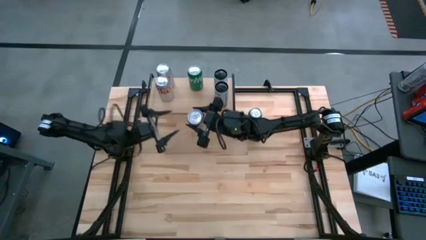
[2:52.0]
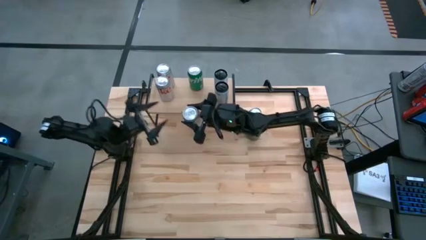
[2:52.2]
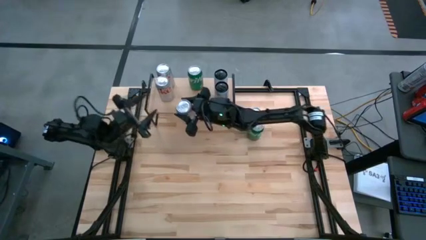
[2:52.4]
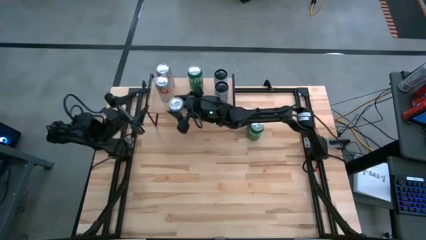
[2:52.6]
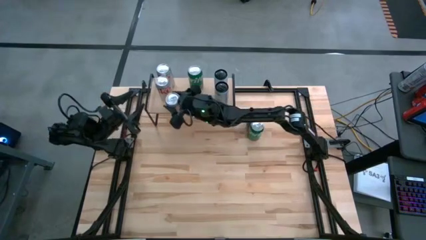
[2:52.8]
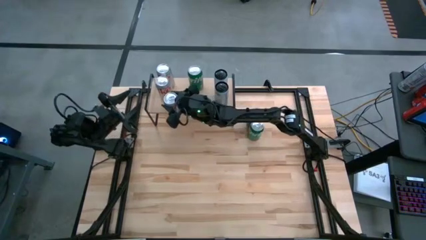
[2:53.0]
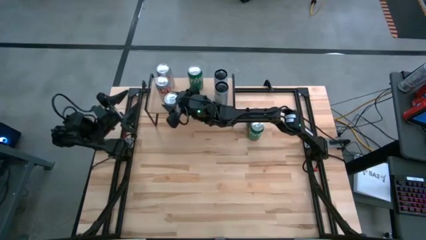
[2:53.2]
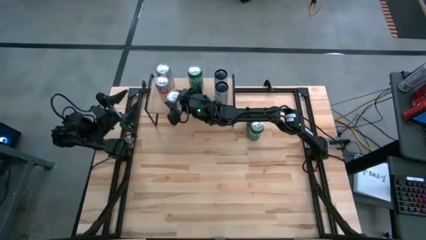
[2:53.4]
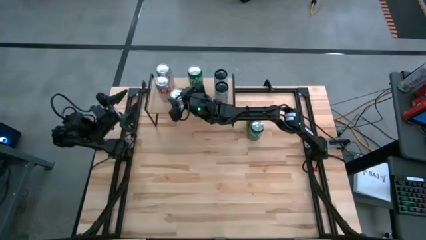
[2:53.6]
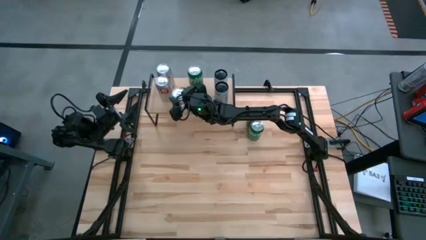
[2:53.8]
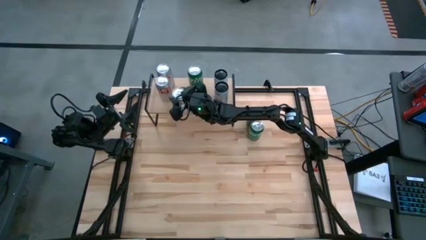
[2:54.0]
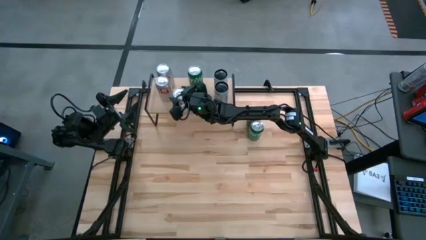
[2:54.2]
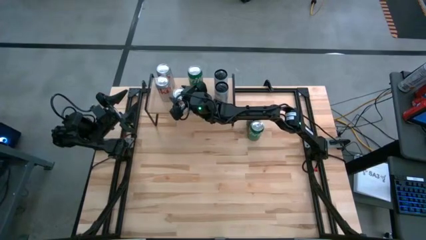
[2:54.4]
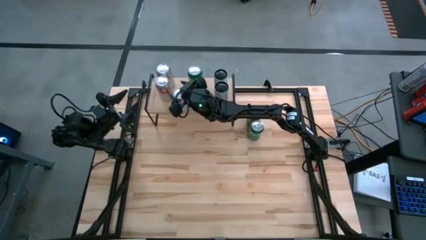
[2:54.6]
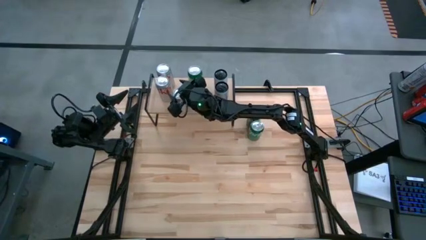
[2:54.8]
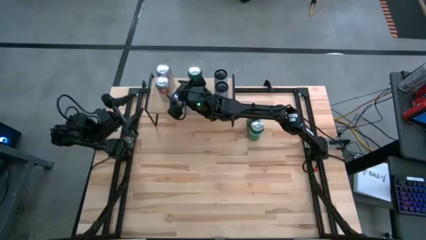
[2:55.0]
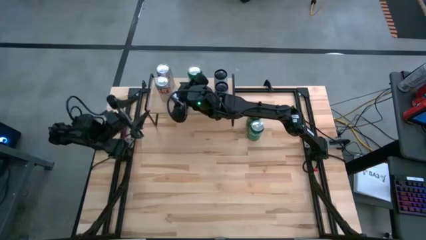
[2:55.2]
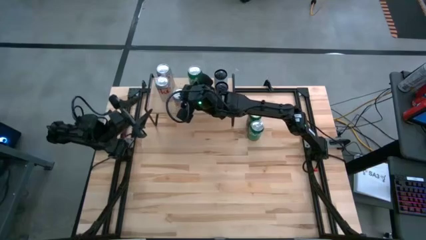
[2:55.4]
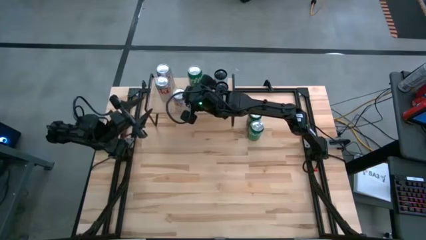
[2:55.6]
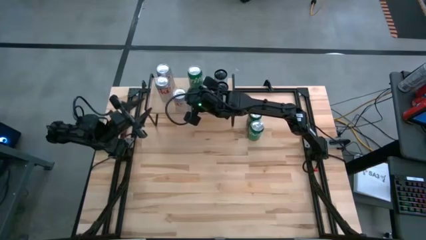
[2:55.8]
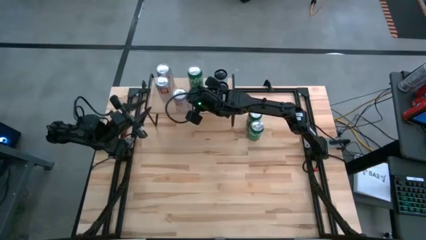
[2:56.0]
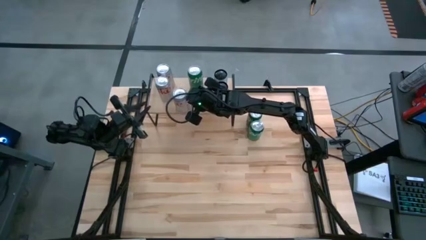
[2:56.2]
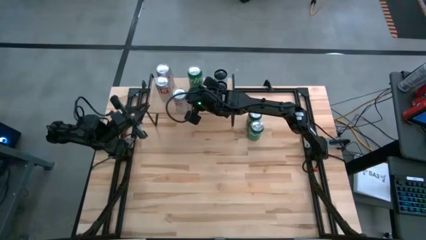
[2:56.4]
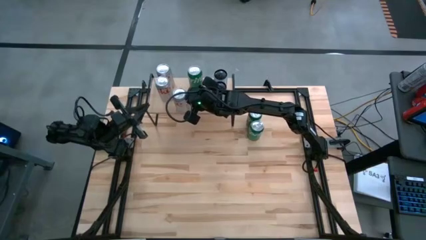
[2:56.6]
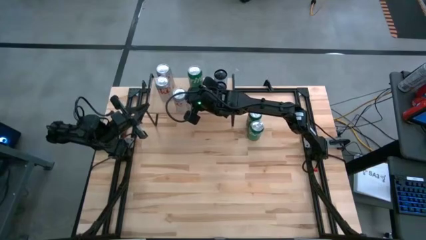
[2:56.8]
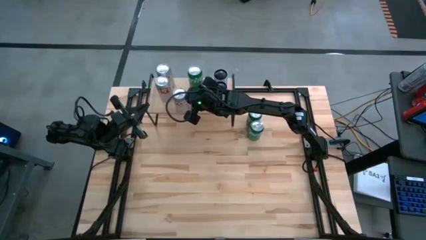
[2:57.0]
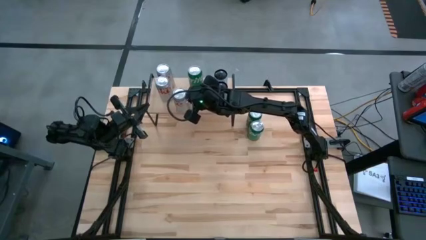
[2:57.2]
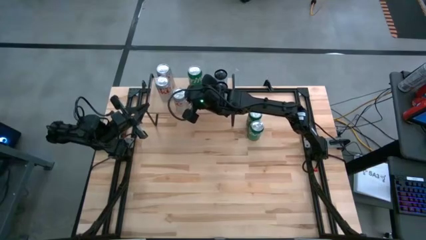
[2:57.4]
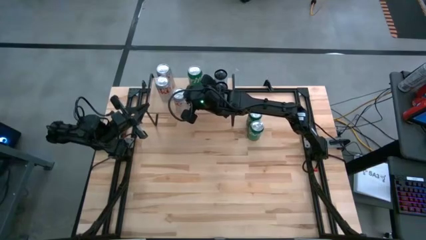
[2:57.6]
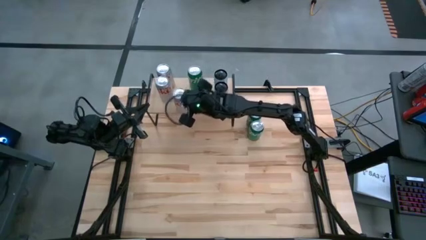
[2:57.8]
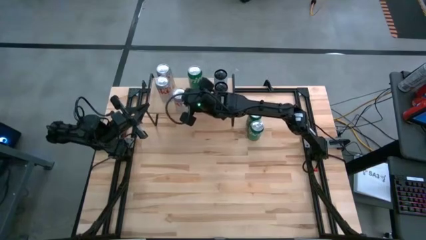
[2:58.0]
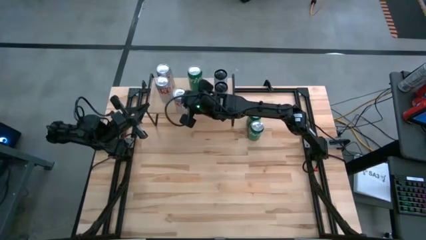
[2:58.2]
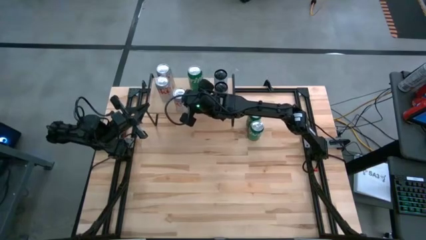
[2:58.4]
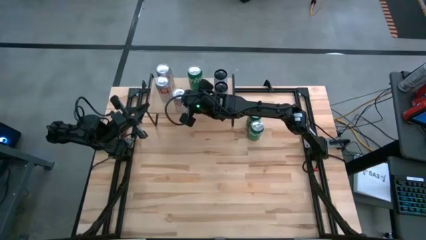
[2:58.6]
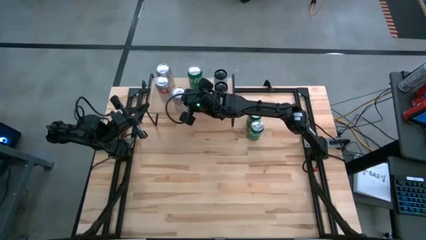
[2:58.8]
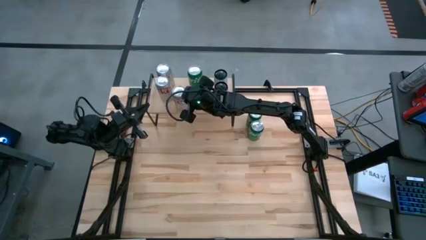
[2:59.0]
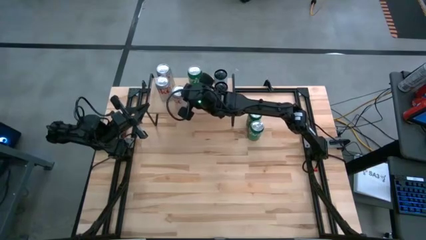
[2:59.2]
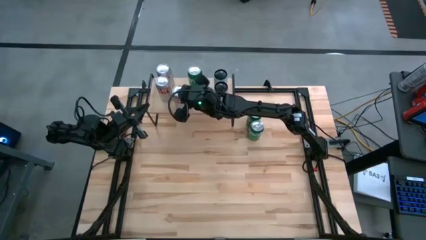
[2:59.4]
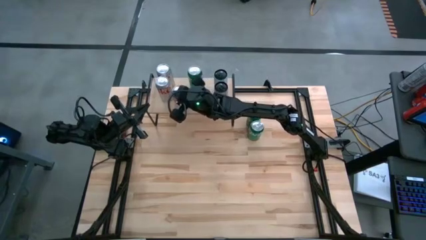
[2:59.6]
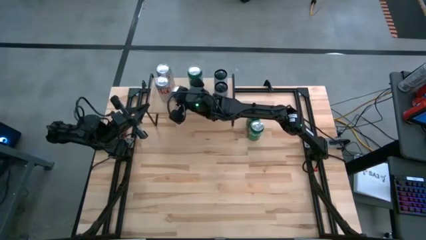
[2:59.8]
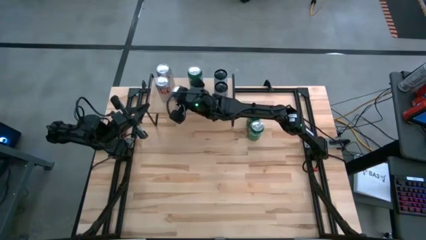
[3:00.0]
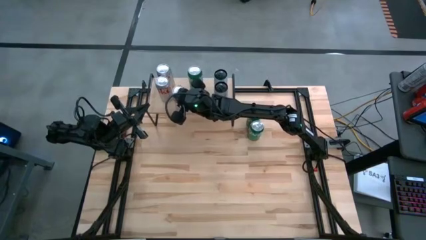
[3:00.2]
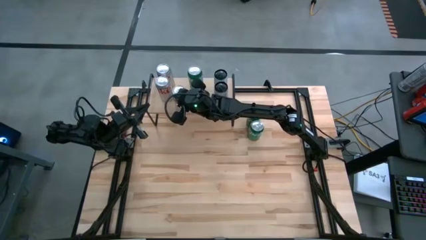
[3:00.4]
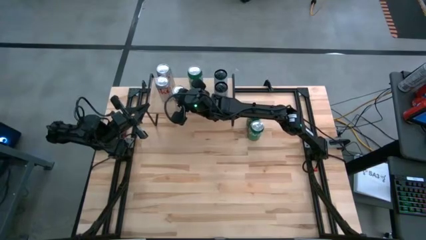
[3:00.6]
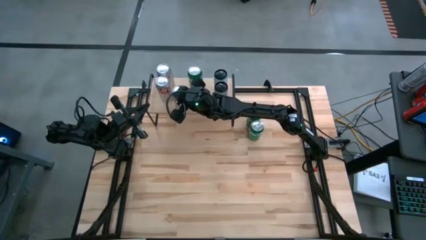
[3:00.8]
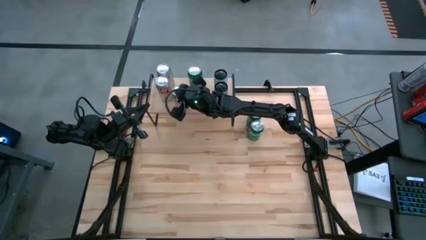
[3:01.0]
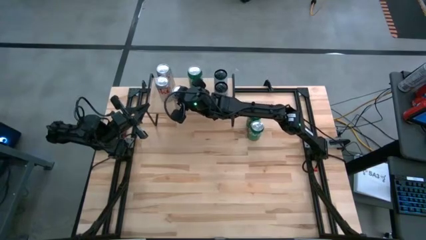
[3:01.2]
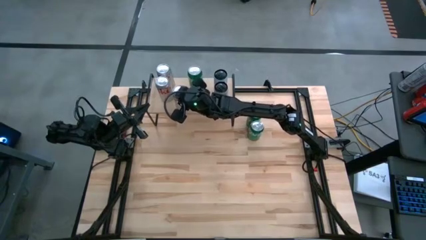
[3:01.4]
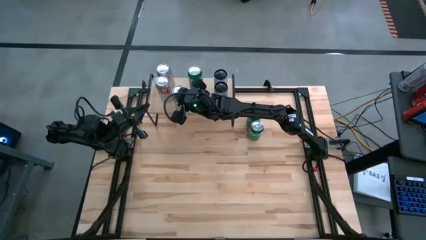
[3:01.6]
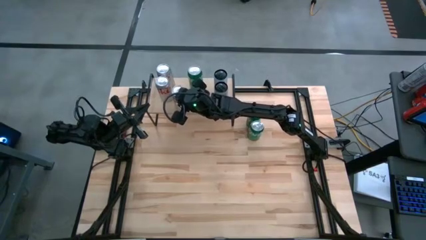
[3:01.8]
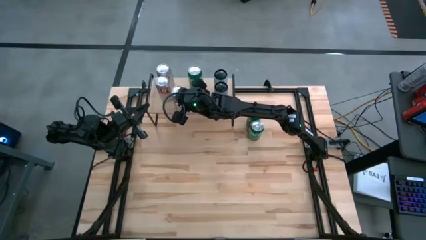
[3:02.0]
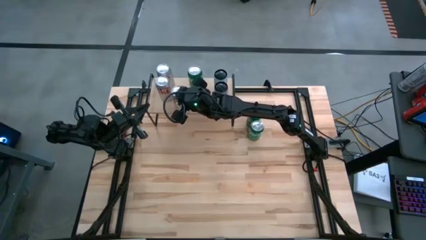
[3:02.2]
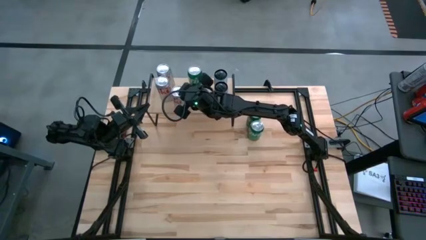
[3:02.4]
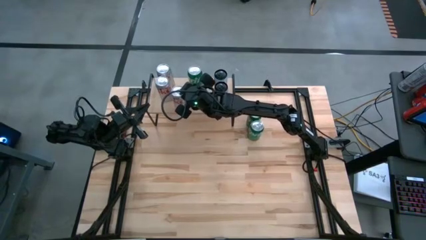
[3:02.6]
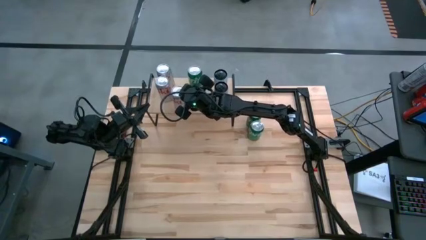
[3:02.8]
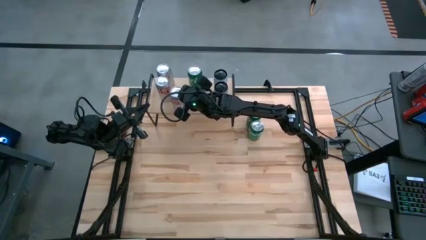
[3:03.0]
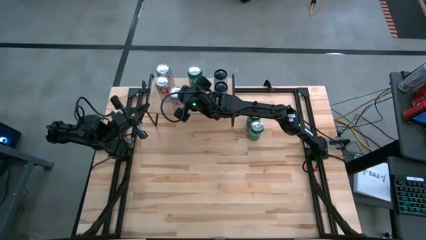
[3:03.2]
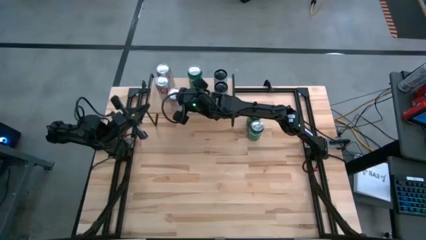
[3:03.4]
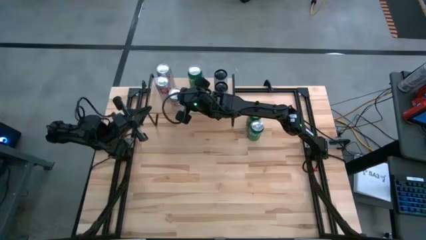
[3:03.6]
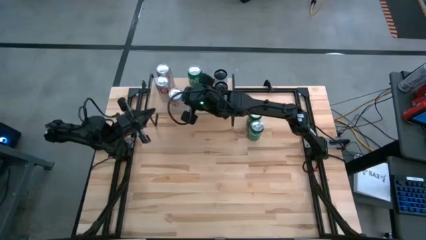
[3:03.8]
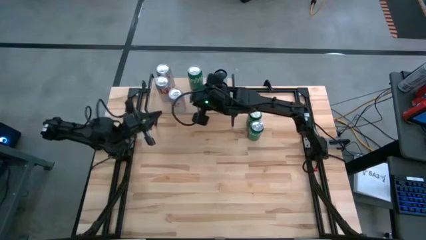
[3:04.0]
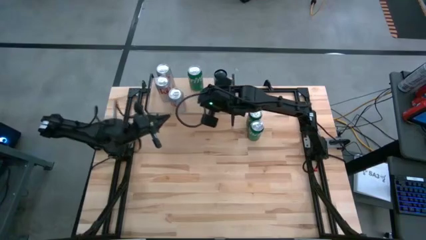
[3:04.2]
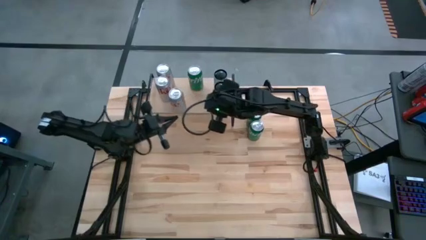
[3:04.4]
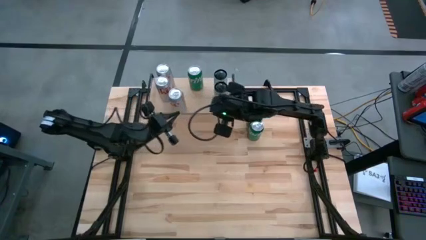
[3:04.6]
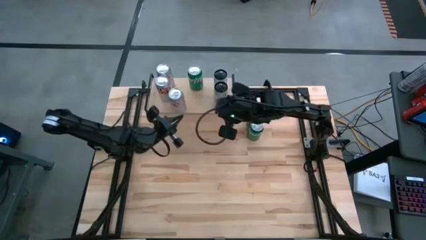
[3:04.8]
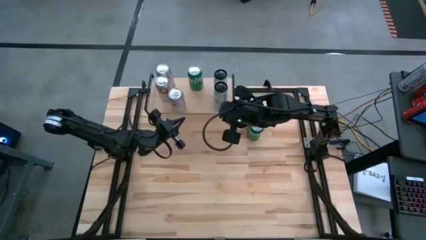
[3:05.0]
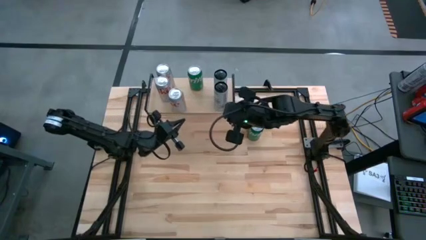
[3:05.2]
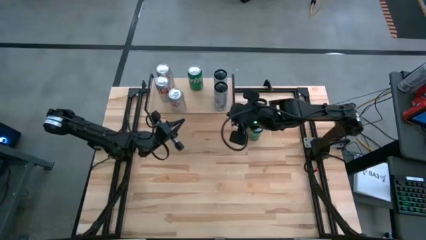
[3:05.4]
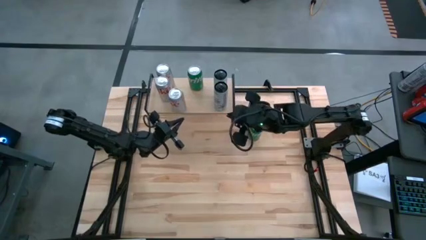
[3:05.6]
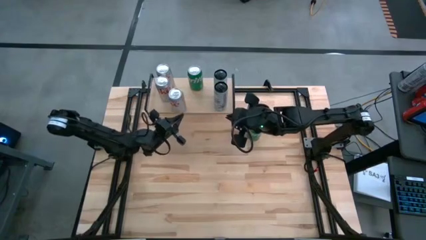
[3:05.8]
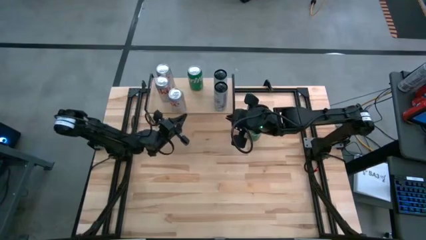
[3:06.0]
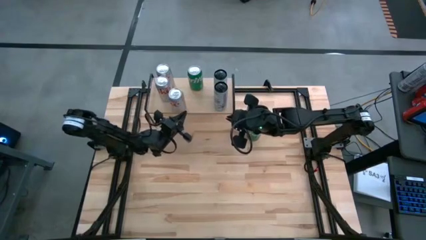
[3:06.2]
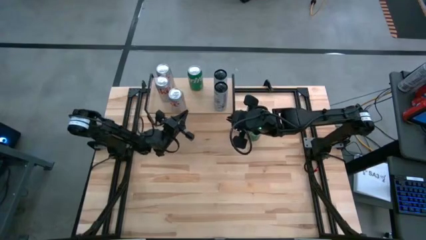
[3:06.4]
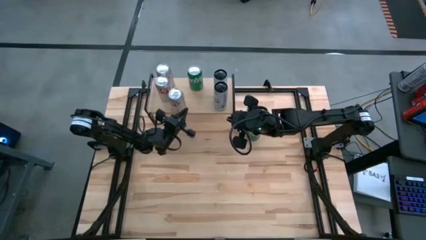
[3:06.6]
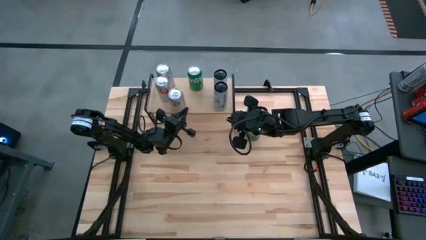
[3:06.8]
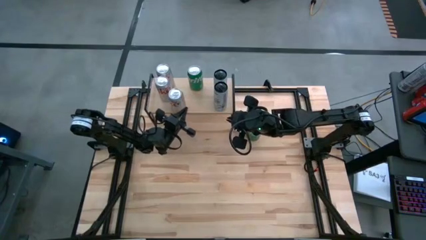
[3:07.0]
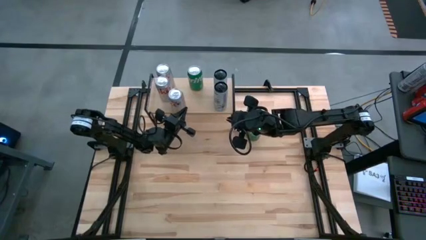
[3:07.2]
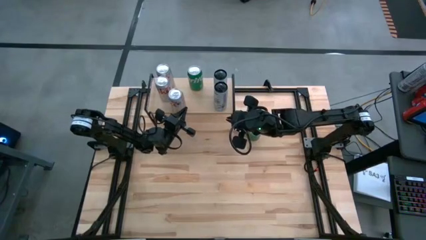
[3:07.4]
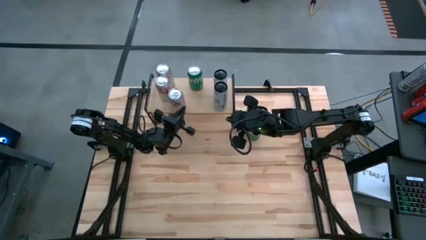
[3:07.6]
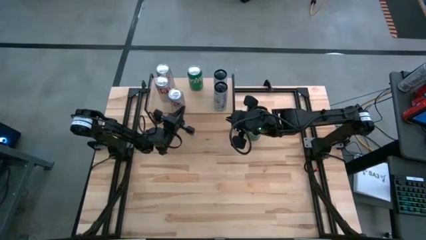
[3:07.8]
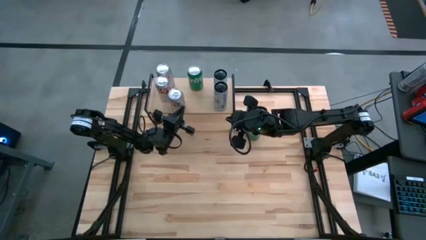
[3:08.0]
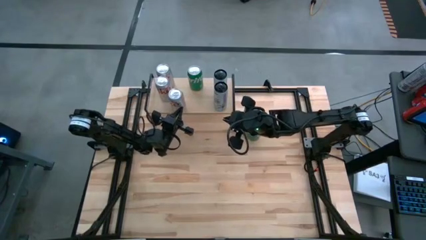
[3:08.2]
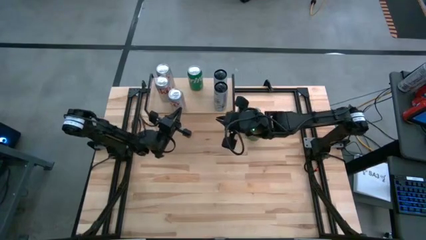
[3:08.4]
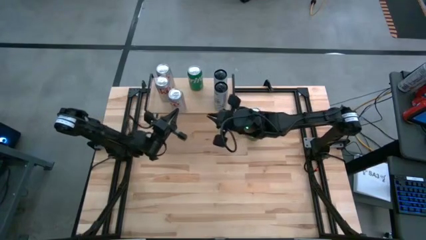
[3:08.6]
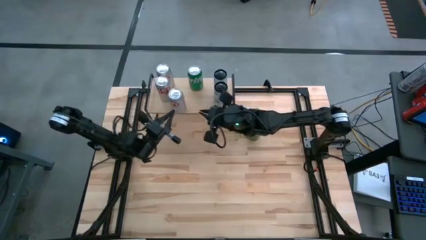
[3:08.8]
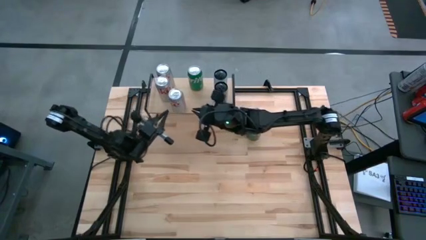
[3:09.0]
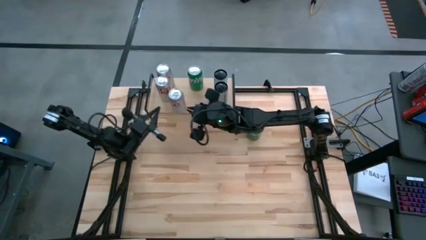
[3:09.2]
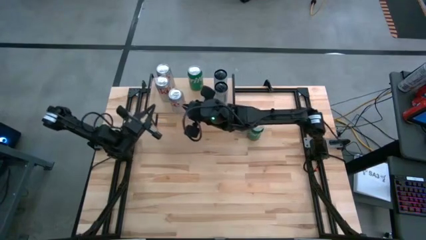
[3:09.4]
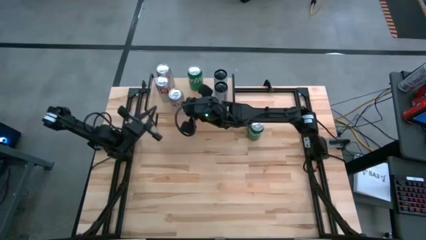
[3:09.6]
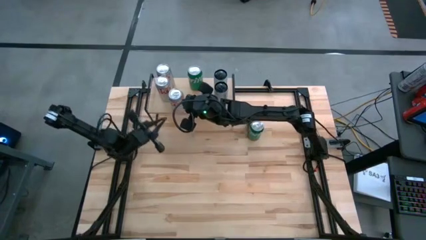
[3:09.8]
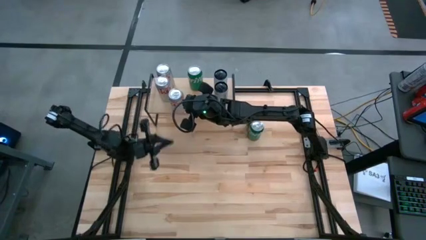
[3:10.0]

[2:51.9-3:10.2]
Task: Place canned beverage on shelf
Put the red-silver soda can aligned with the other red-silver soda cans on the shelf
